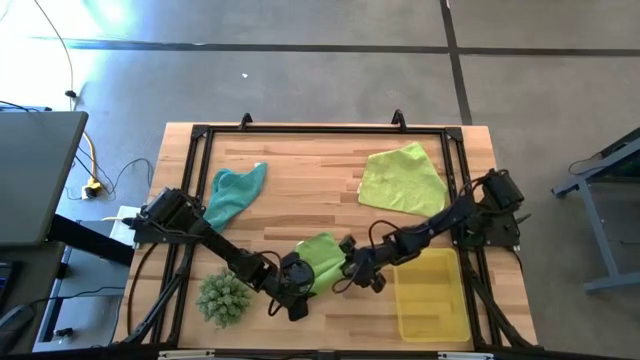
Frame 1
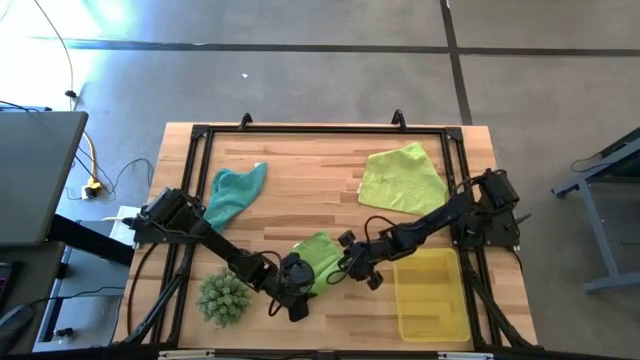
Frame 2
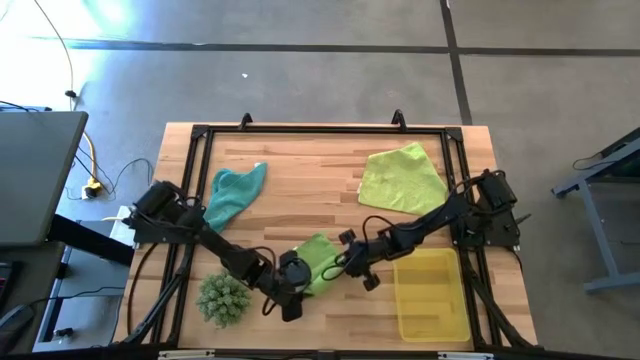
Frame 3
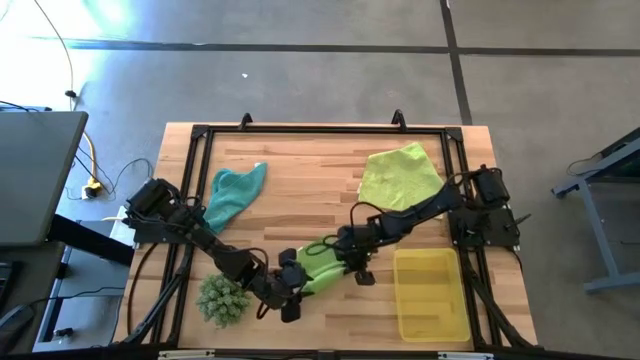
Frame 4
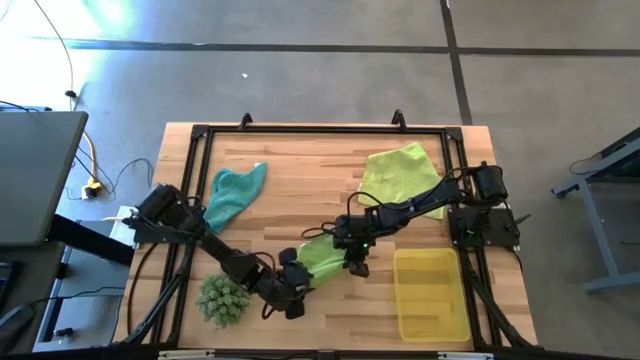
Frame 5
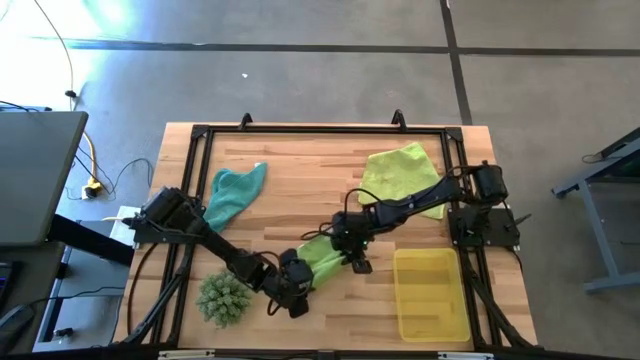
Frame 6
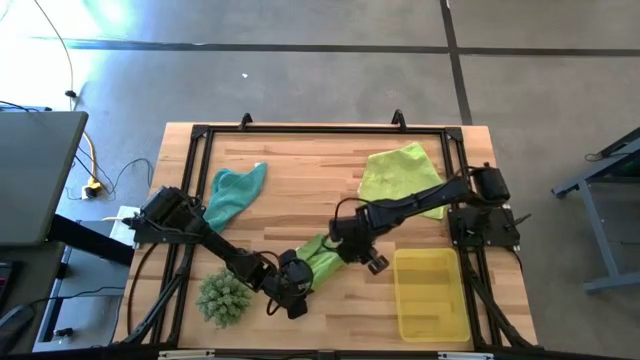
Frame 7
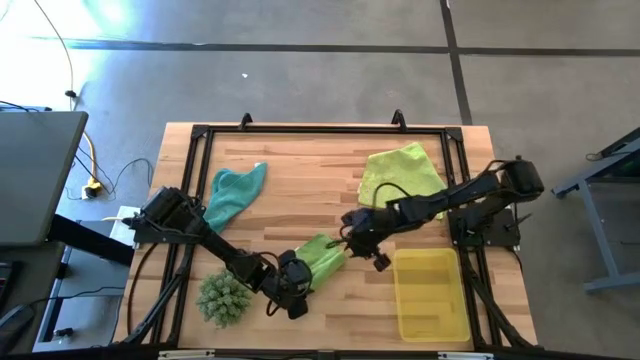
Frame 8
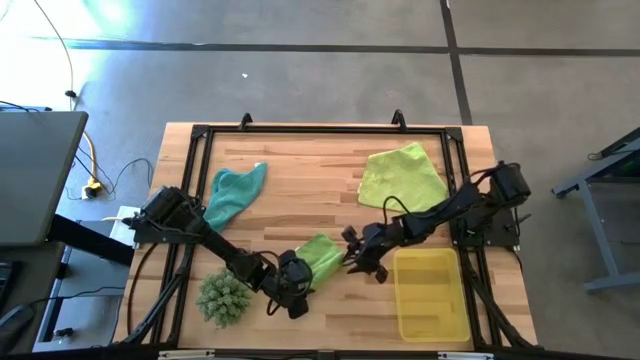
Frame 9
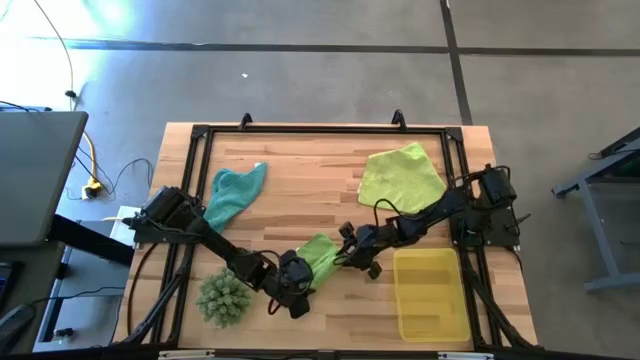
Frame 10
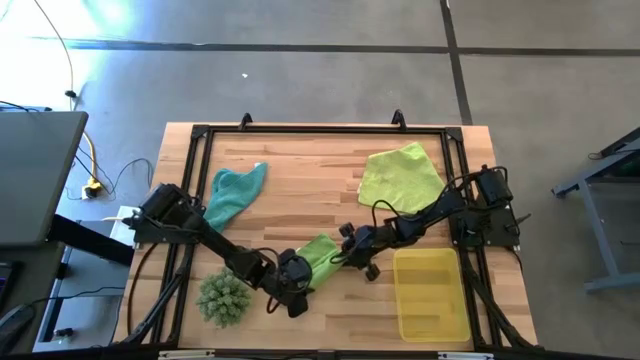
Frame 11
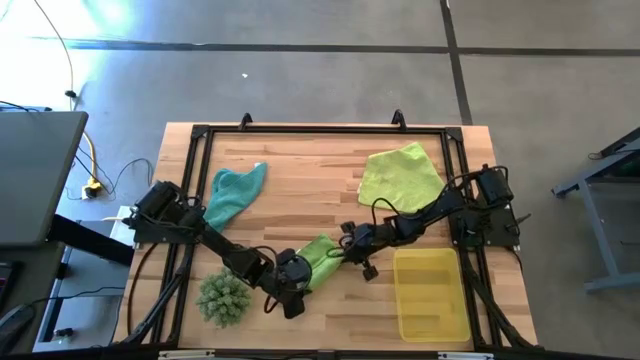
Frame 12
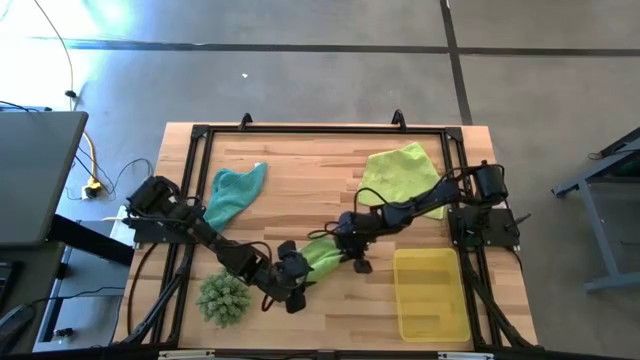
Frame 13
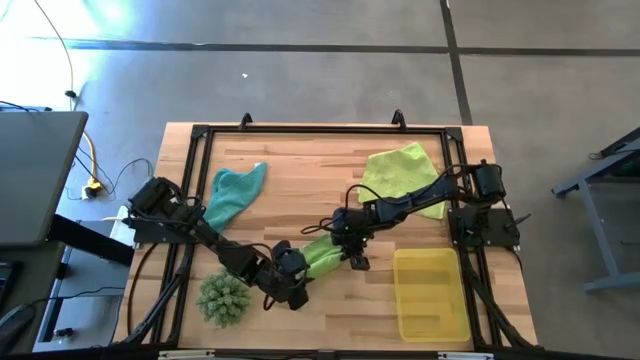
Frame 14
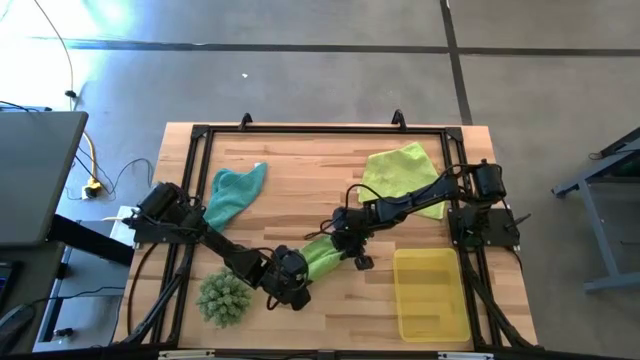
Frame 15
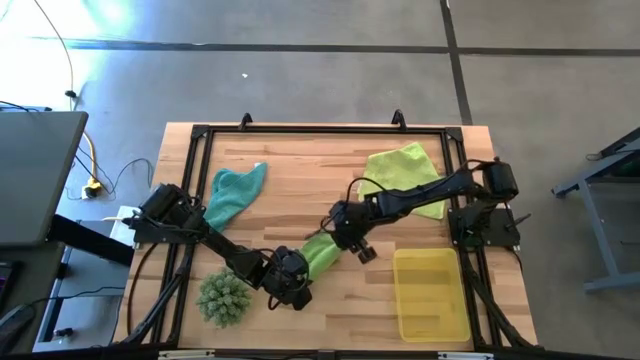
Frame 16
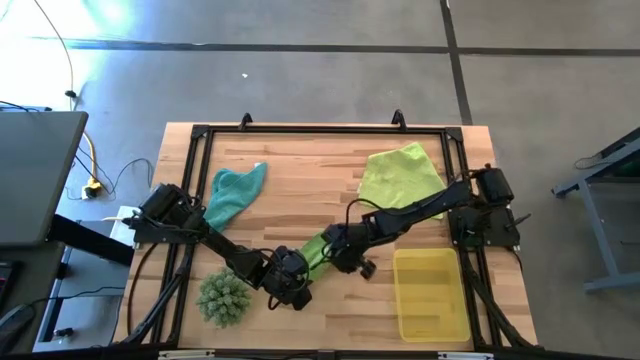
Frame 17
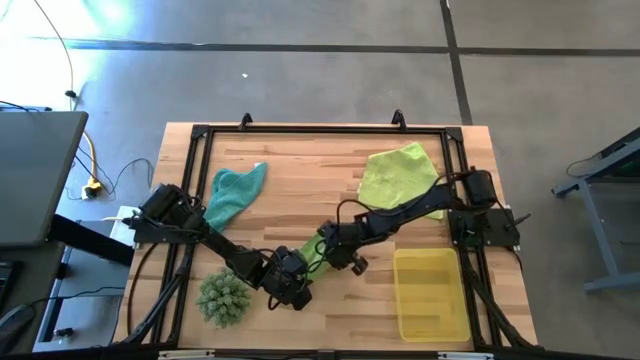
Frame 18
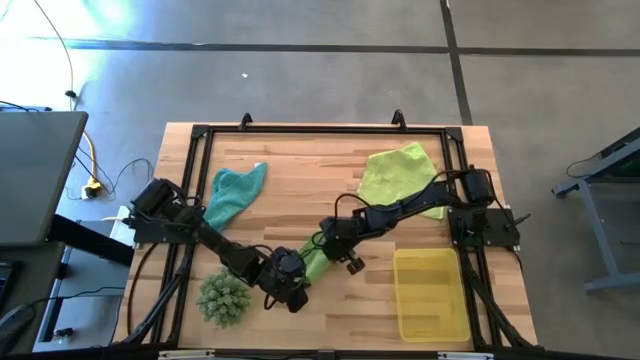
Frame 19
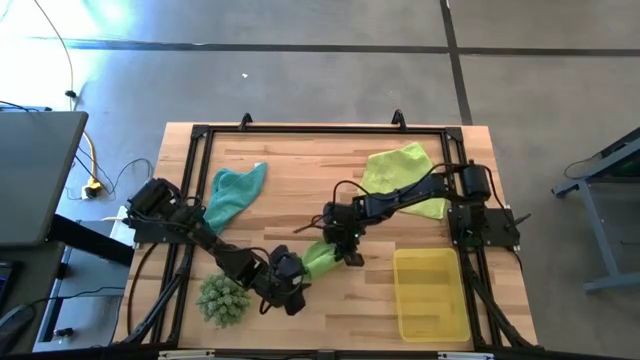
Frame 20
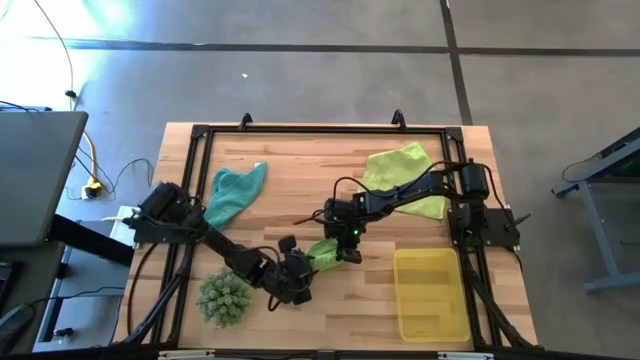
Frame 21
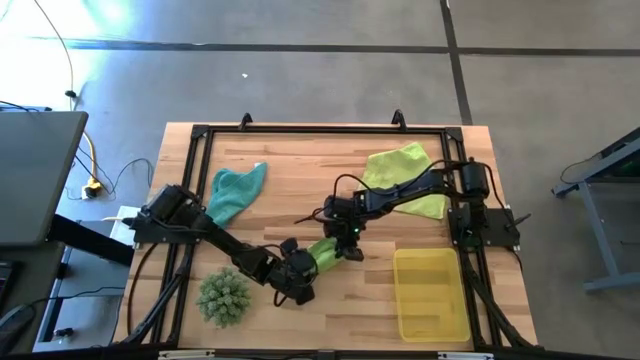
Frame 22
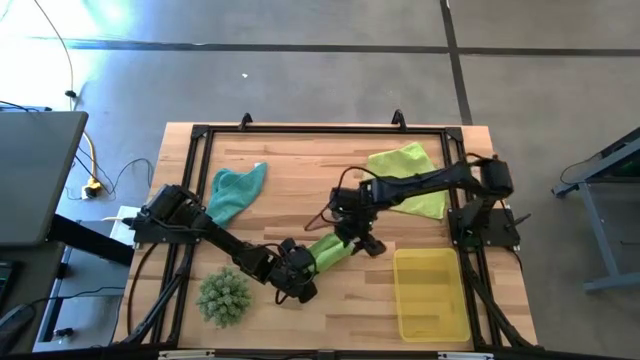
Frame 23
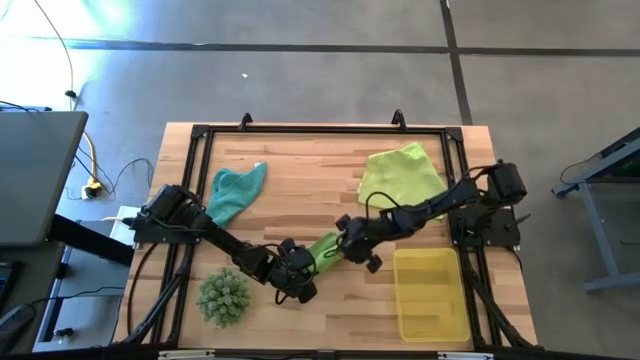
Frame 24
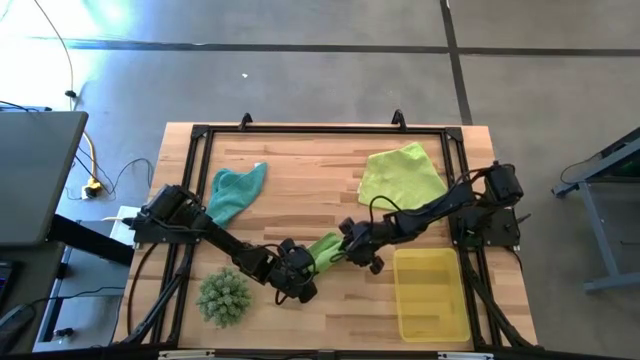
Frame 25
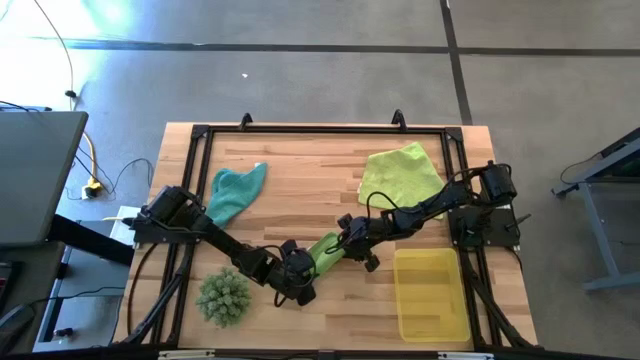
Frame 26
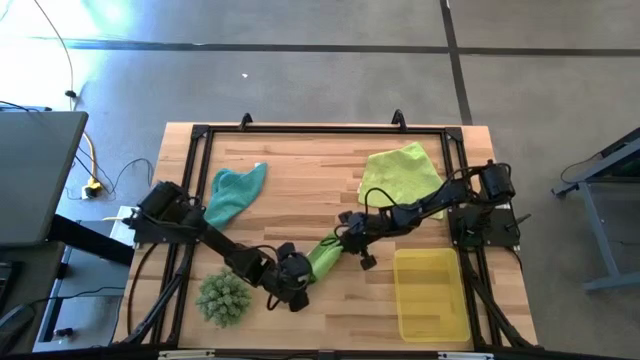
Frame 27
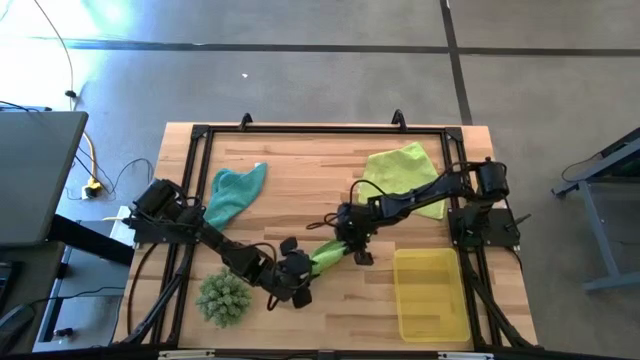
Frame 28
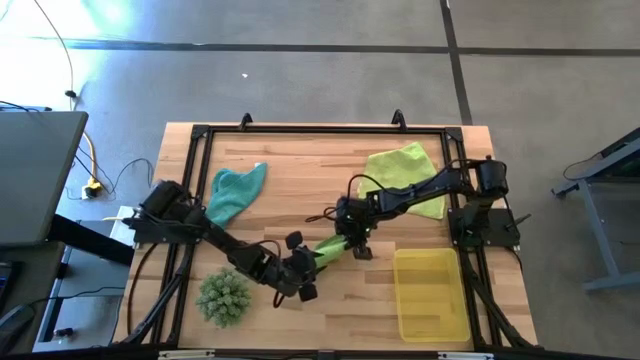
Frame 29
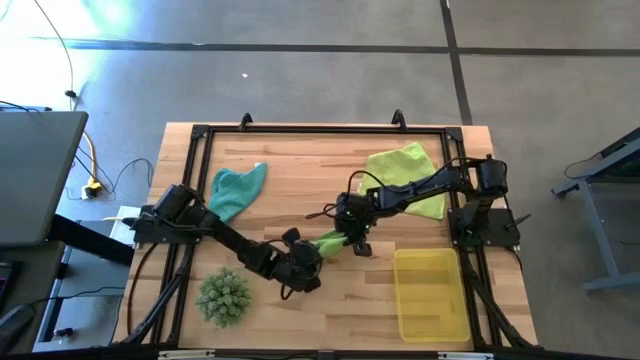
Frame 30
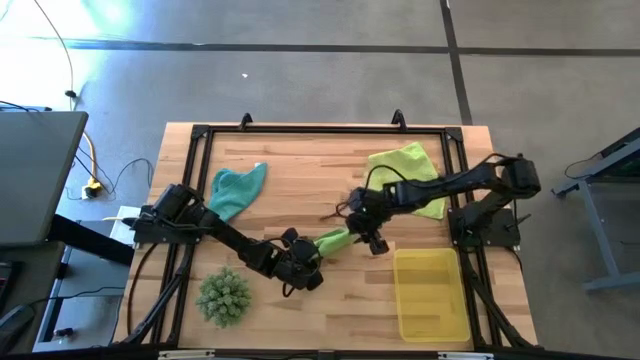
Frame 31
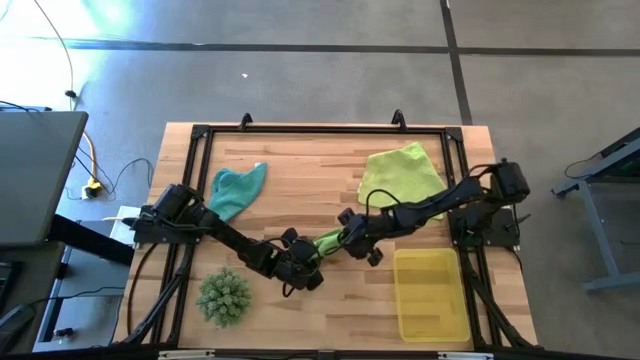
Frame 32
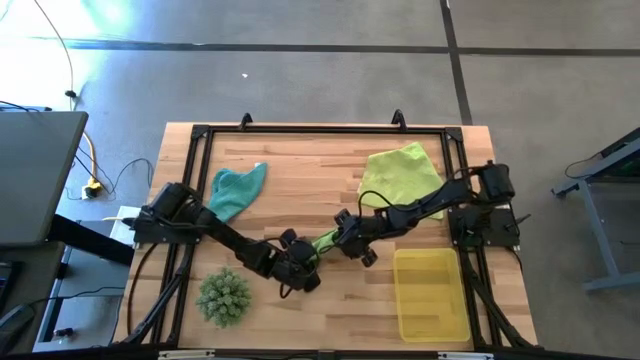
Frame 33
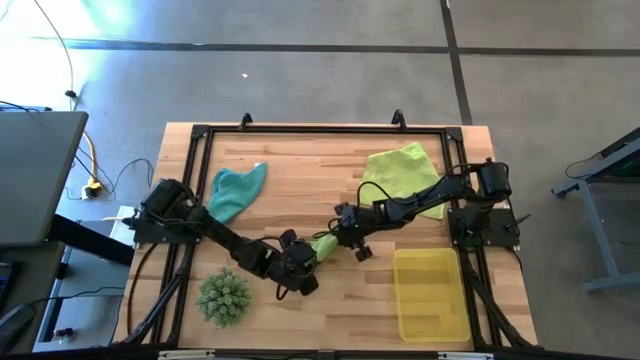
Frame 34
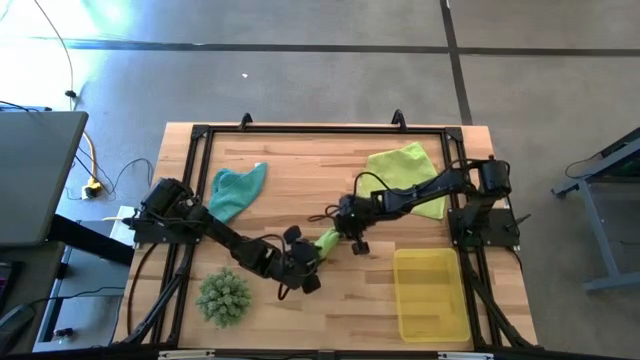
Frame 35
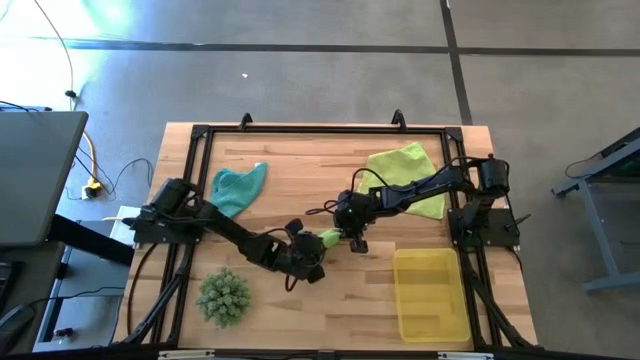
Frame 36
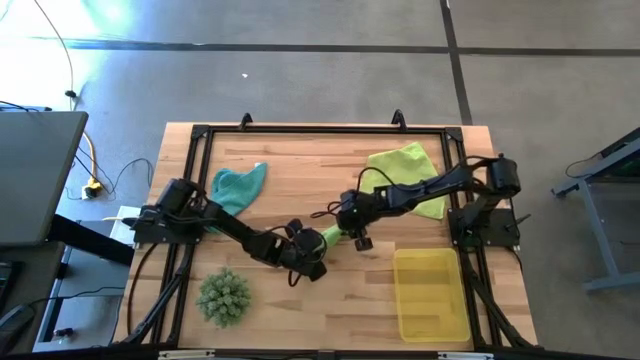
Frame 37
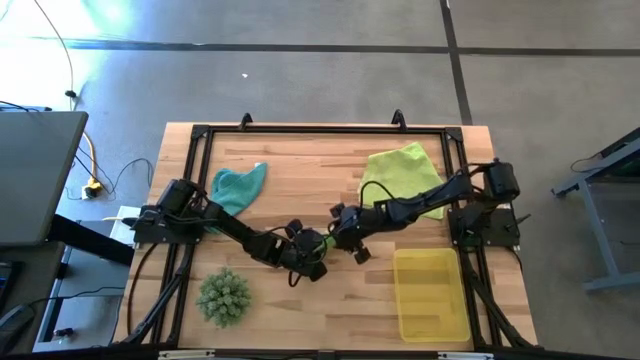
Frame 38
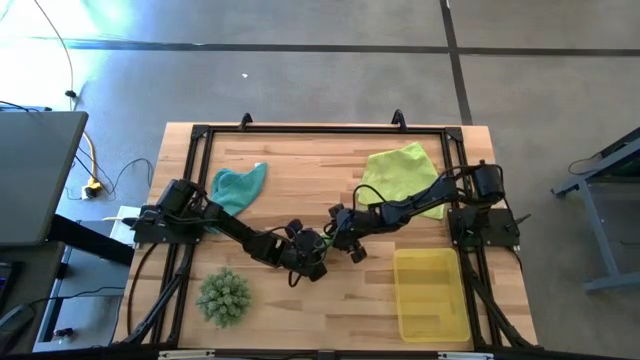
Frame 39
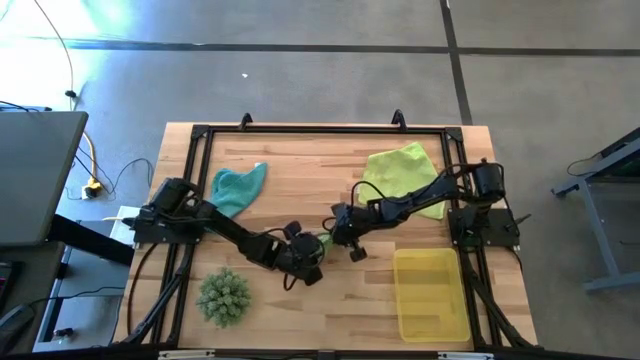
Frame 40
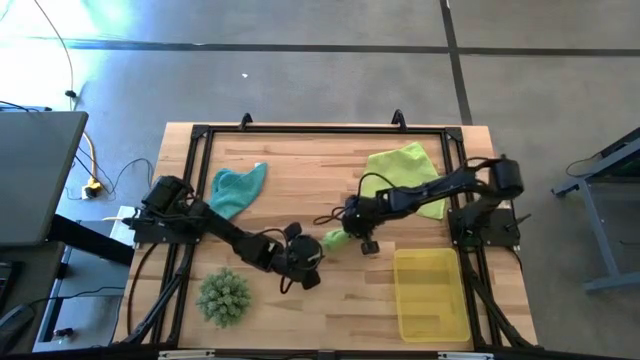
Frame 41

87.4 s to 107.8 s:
Task: Roll microfiber towels into tight, uniform cylinder then place into a basket
Roll the green microfiber cloth

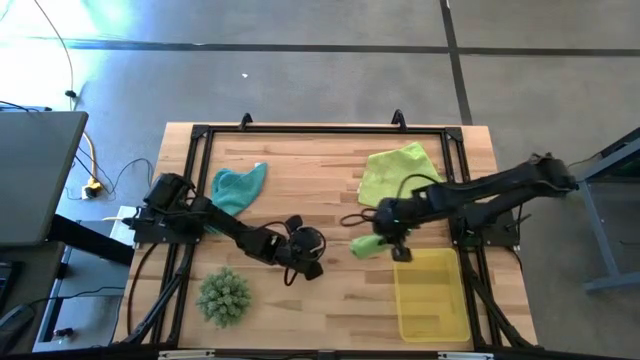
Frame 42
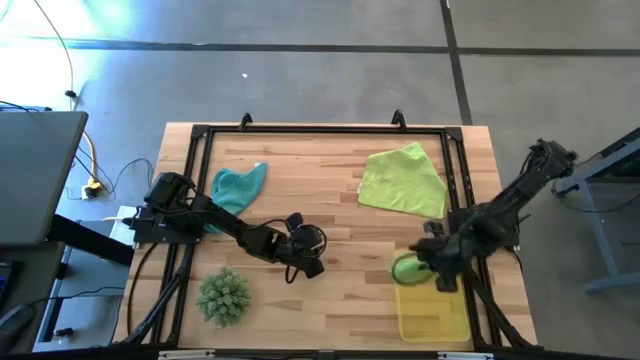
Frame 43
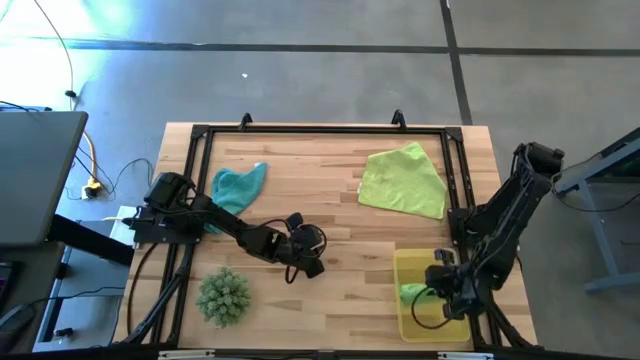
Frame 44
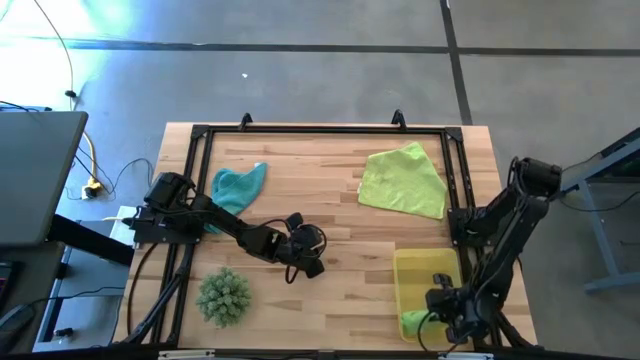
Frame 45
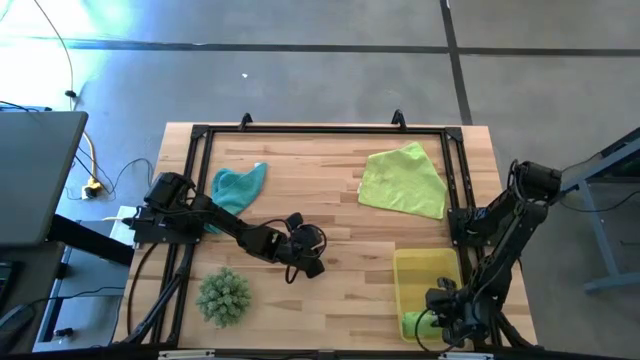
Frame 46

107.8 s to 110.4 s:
Put the green microfiber cloth into the yellow bin
